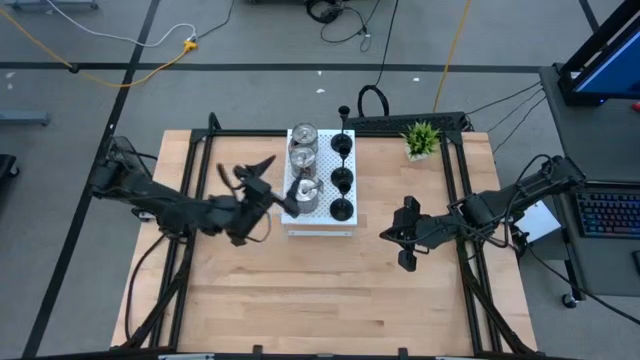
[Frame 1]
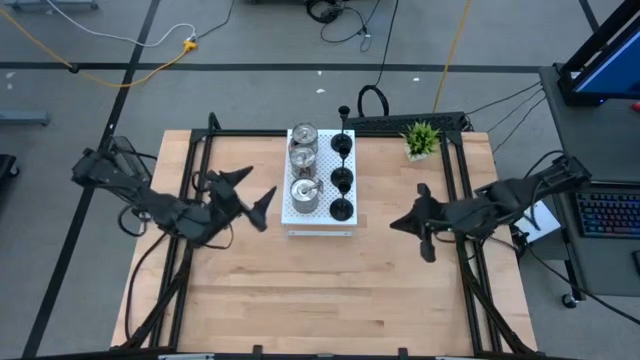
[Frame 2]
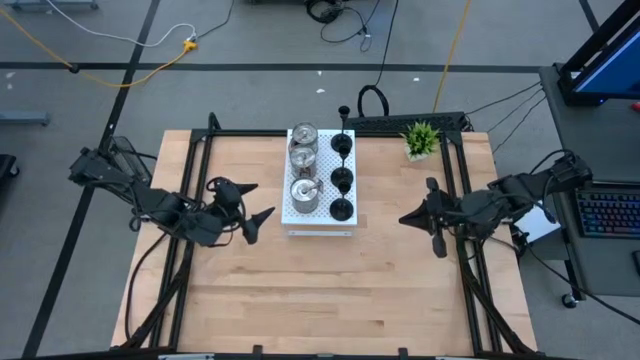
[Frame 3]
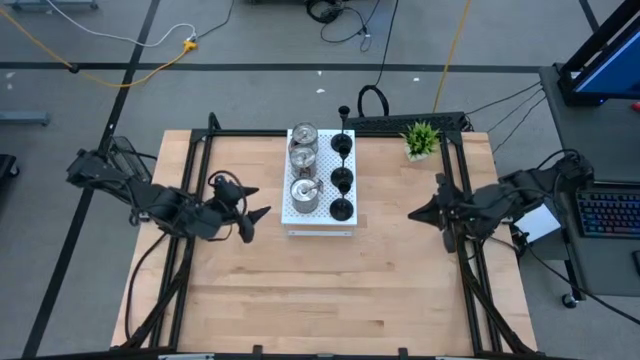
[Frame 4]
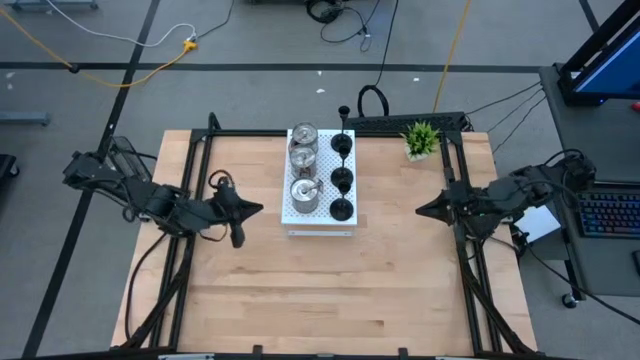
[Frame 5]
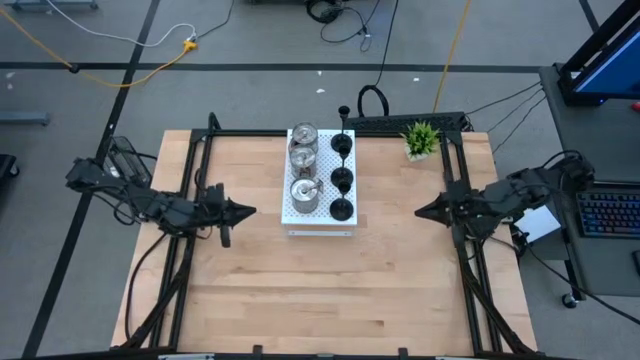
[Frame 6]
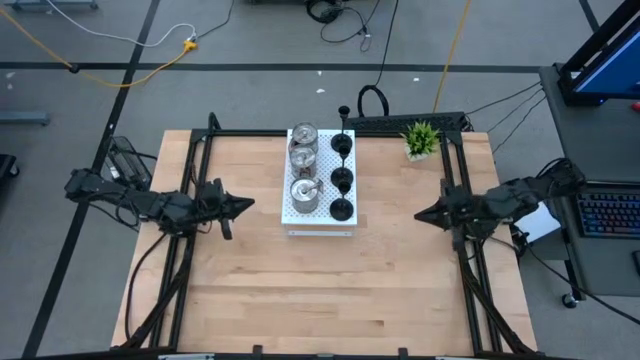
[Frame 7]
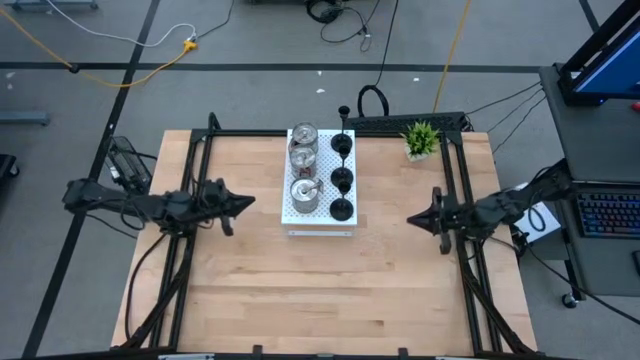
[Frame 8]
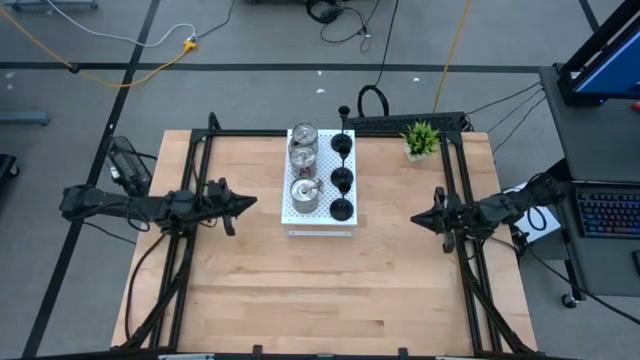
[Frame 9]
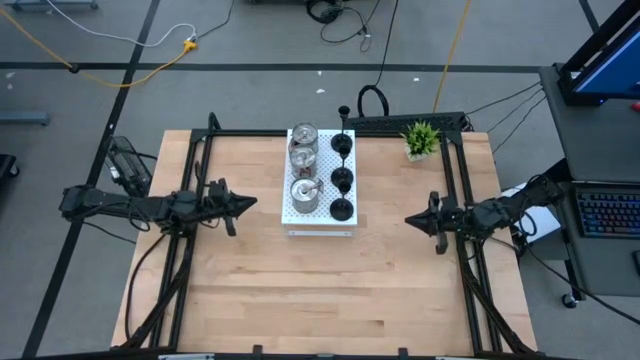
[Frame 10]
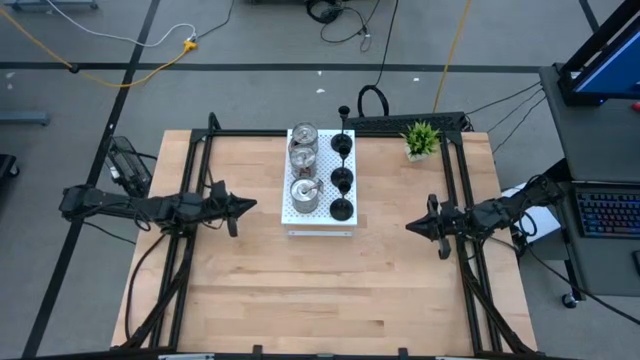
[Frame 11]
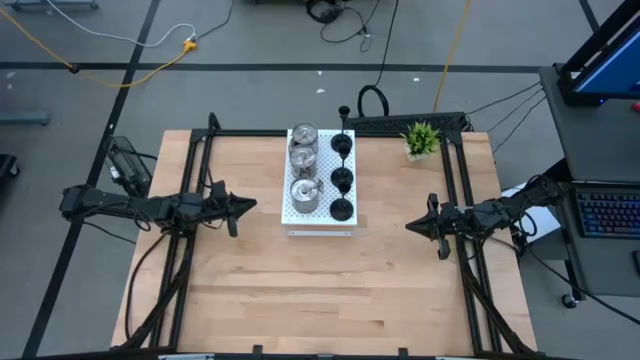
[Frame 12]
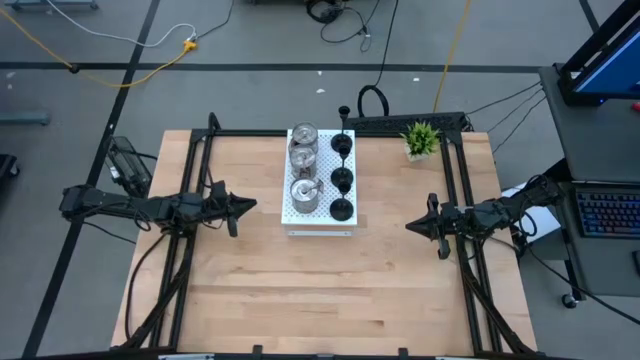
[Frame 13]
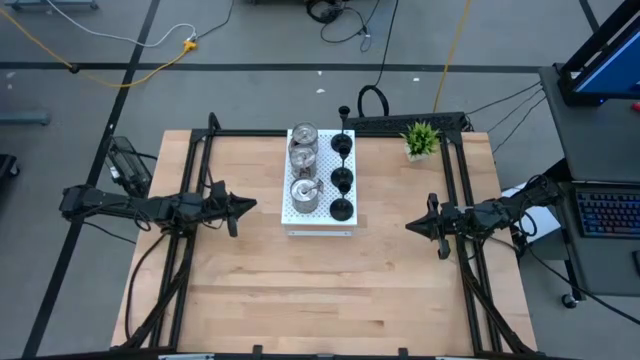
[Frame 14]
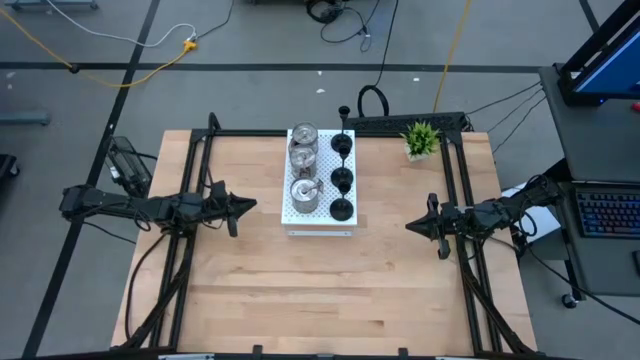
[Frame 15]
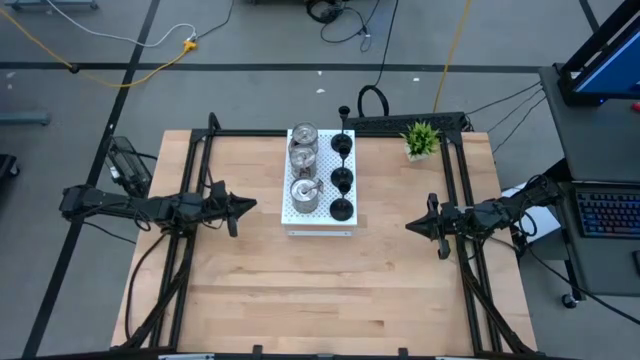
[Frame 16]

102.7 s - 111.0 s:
Task: Pick & Place candle stick holders
Return to Home Position

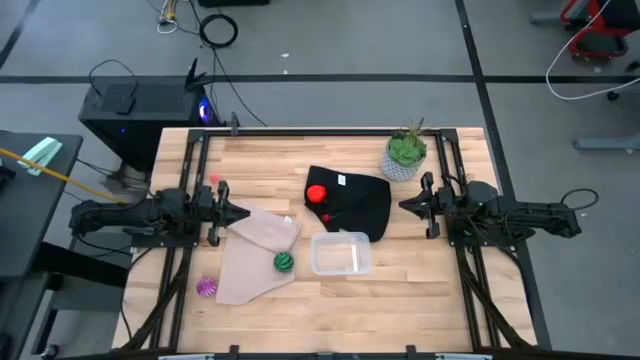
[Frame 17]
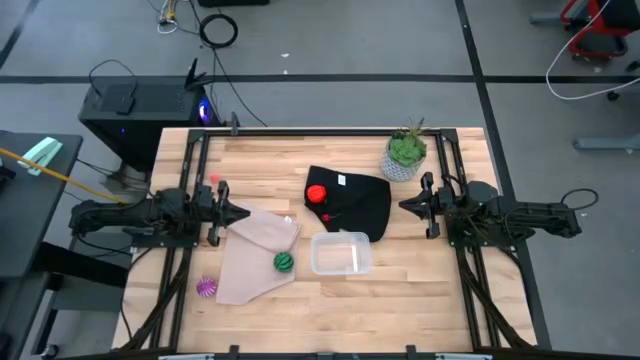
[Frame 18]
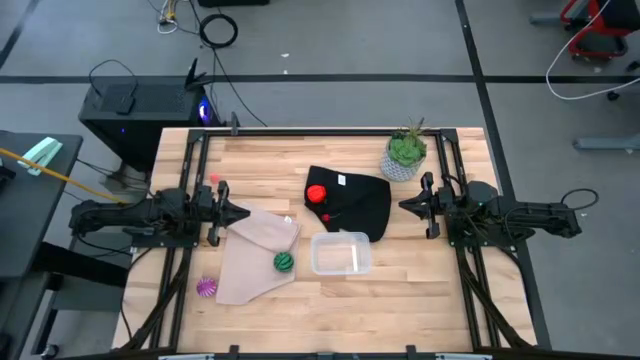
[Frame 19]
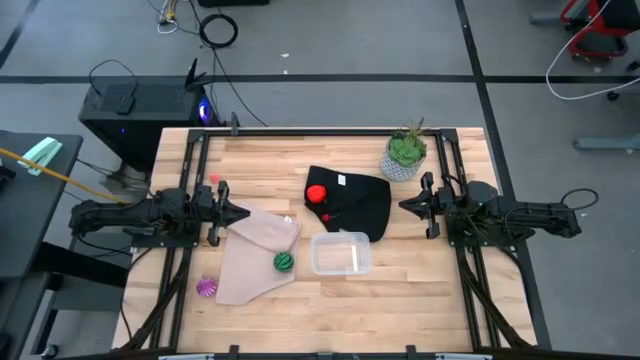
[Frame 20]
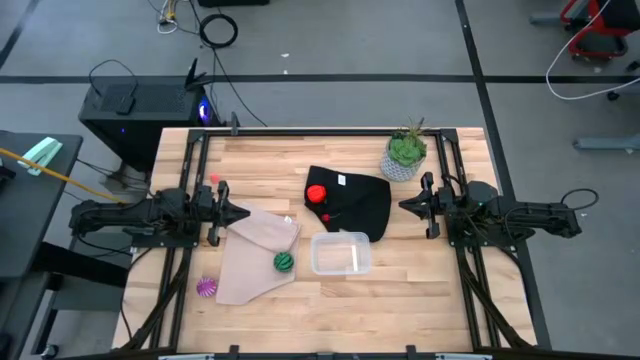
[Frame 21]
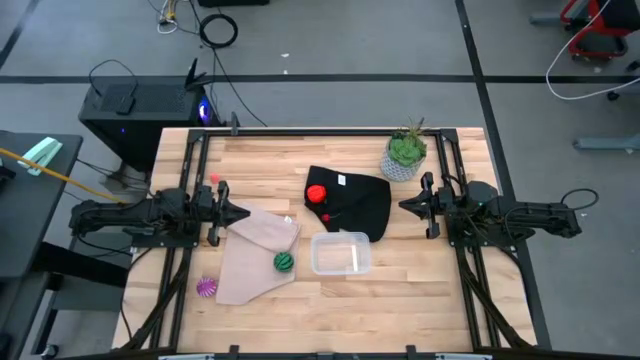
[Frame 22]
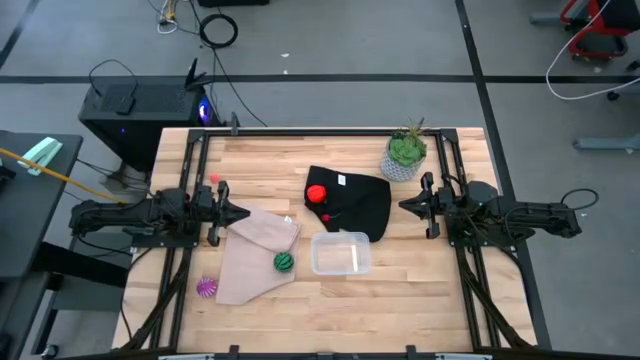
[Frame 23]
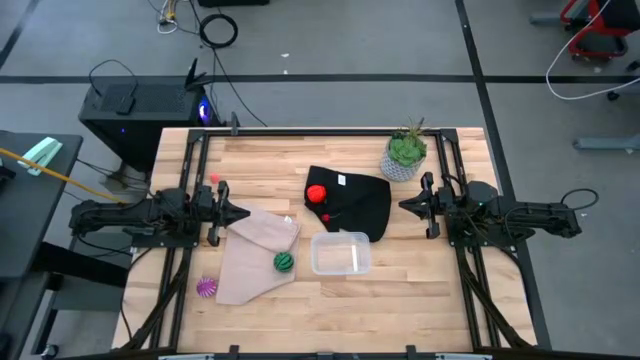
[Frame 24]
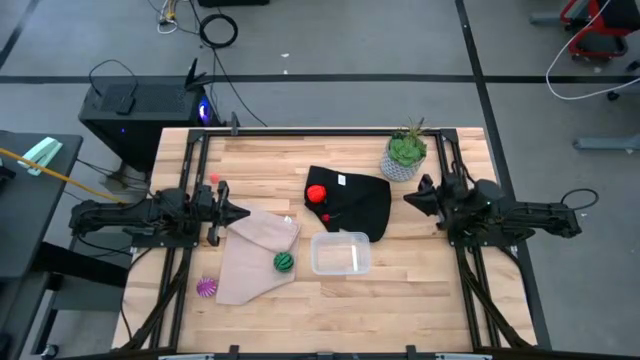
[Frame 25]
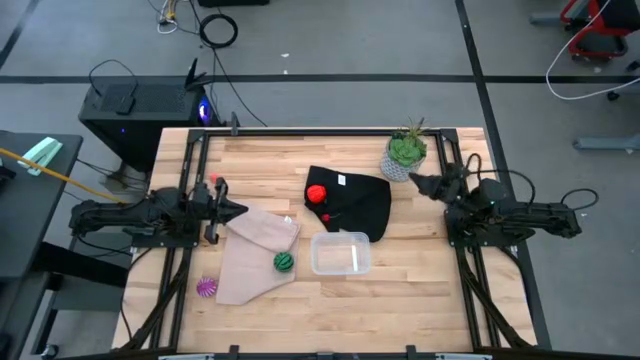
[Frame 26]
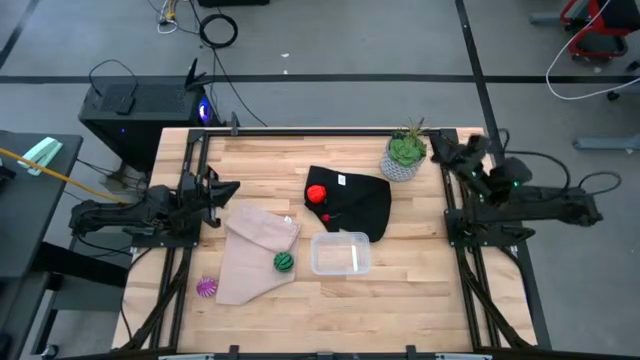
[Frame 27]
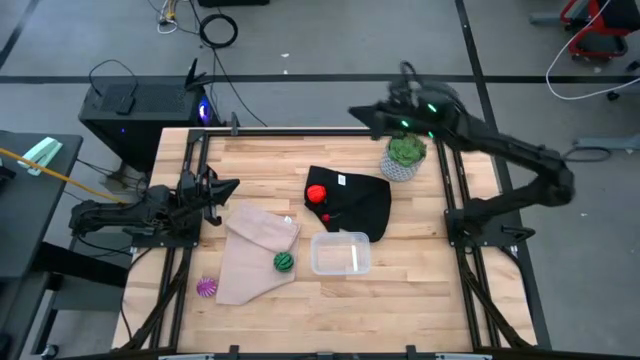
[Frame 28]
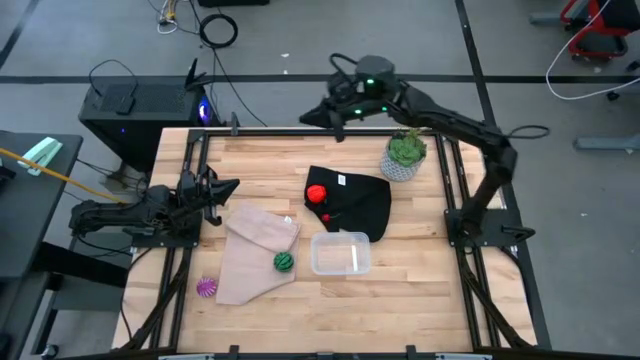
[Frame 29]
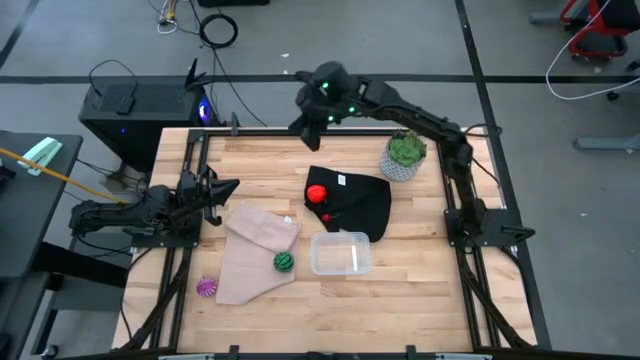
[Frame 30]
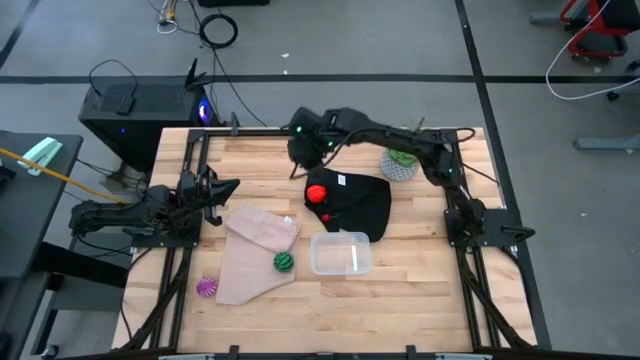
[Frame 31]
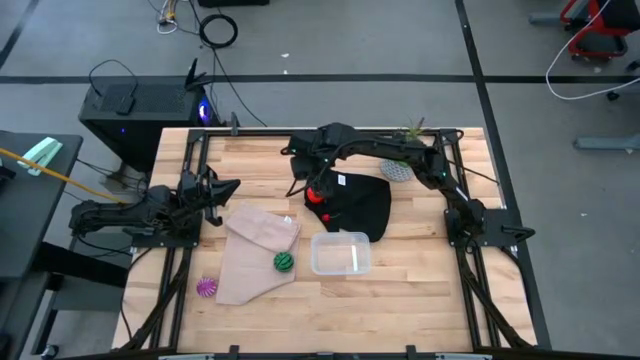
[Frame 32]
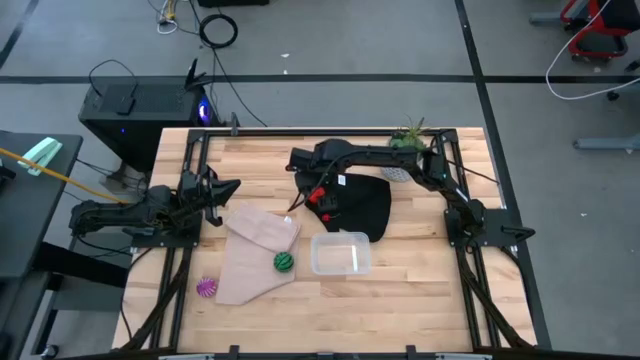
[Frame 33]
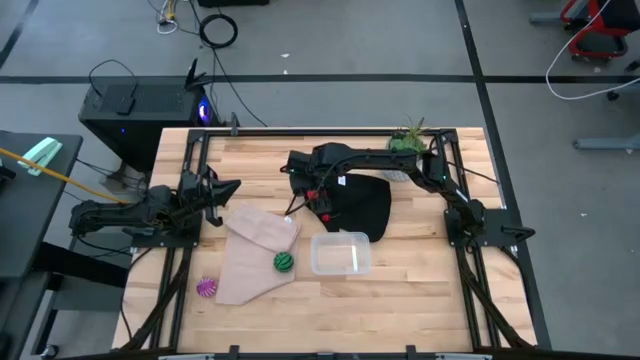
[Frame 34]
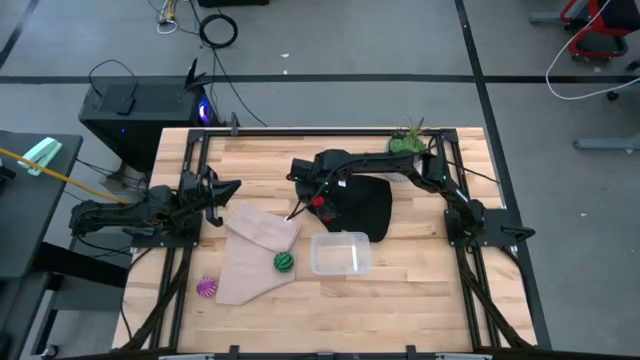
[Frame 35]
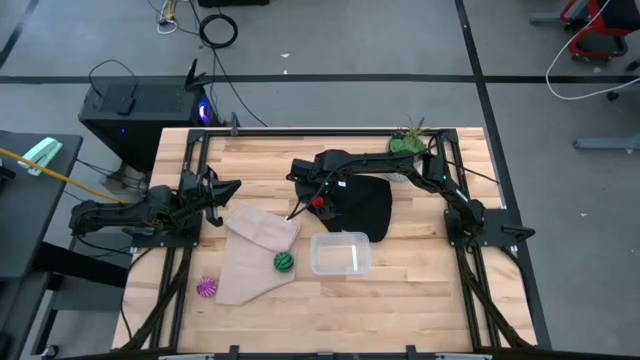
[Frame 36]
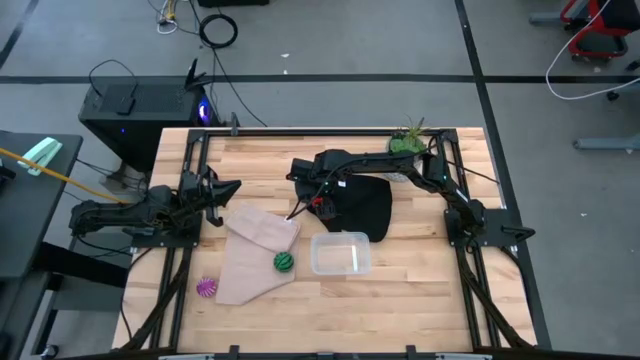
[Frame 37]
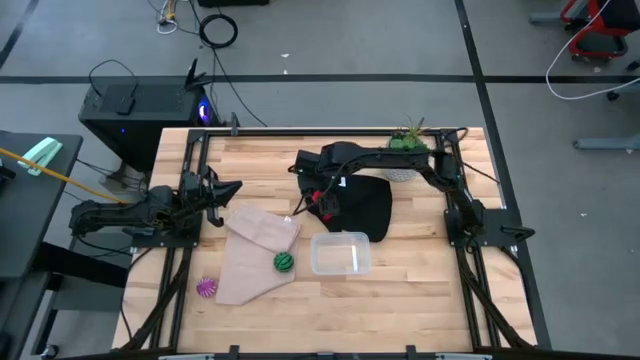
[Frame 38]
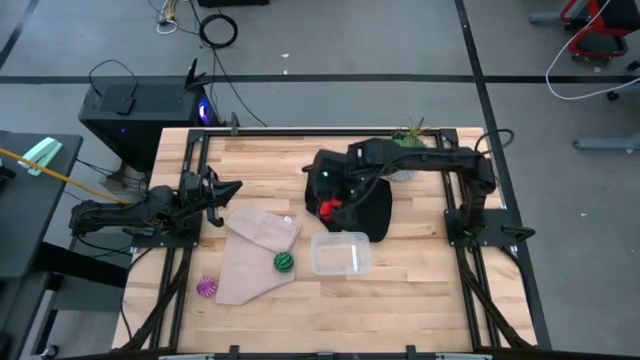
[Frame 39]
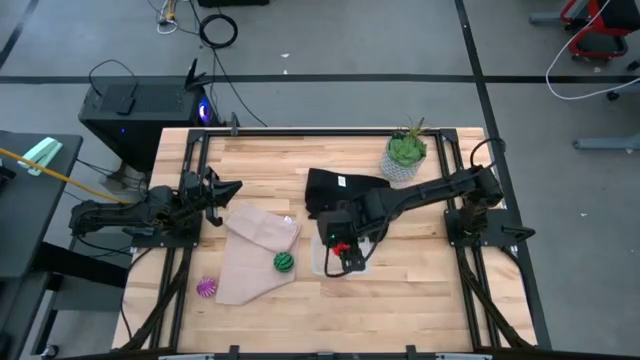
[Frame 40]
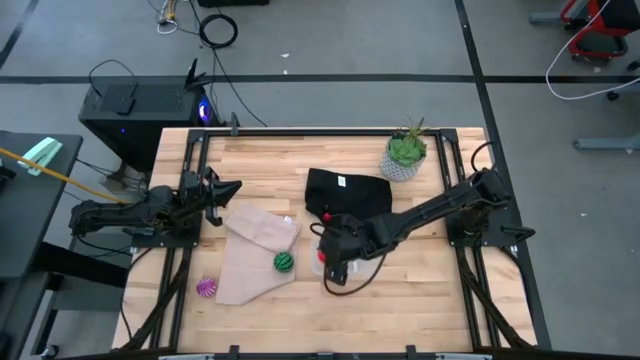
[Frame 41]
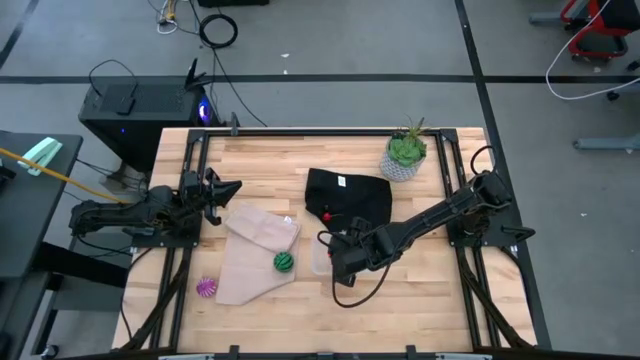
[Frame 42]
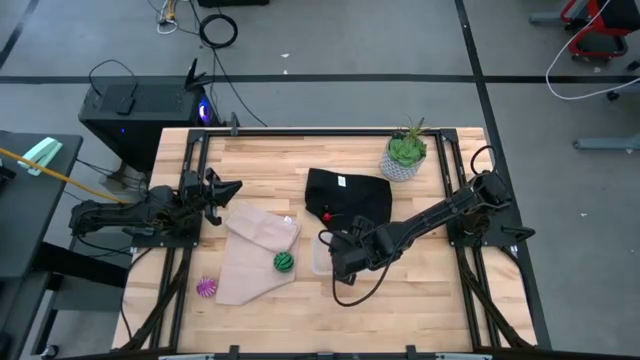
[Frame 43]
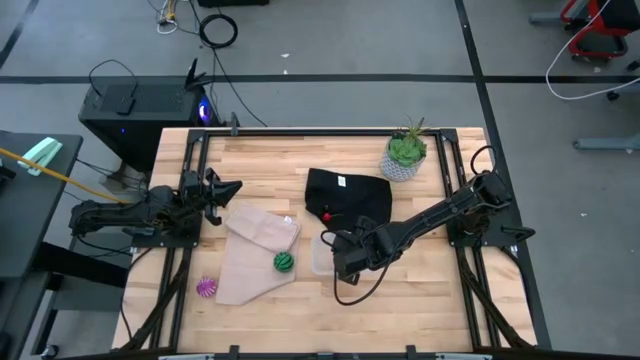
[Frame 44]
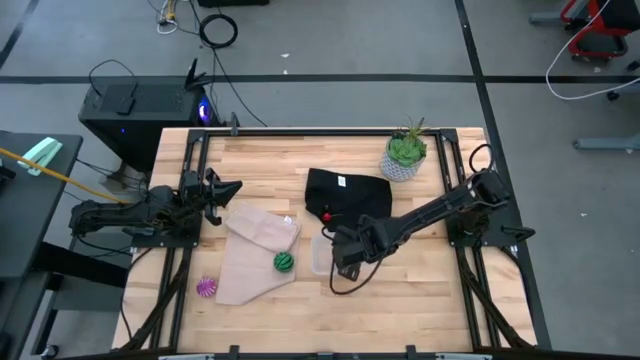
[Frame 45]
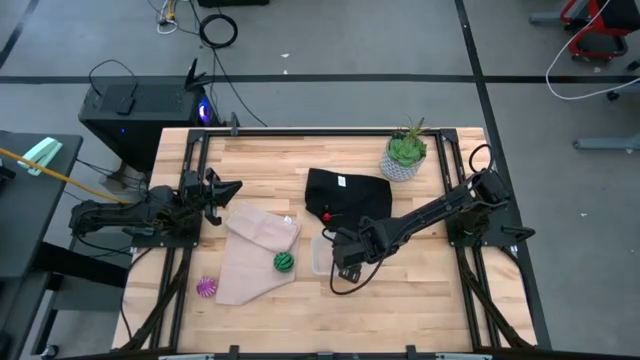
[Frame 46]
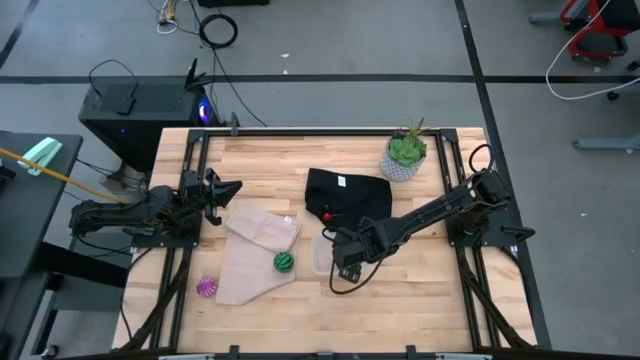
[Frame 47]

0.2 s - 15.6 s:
Task: Pick and placing Produce into tupperware
Put the apple into the transparent bin
